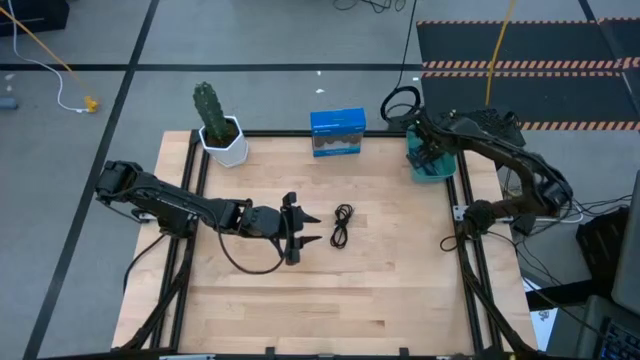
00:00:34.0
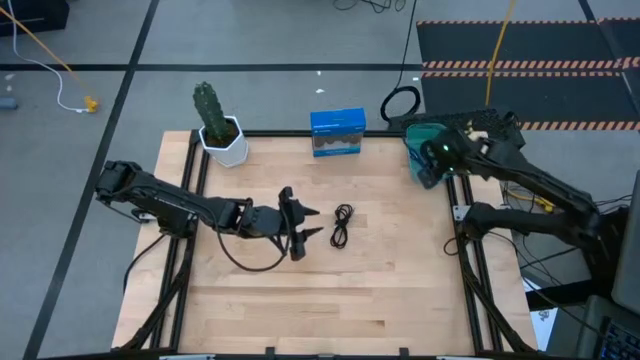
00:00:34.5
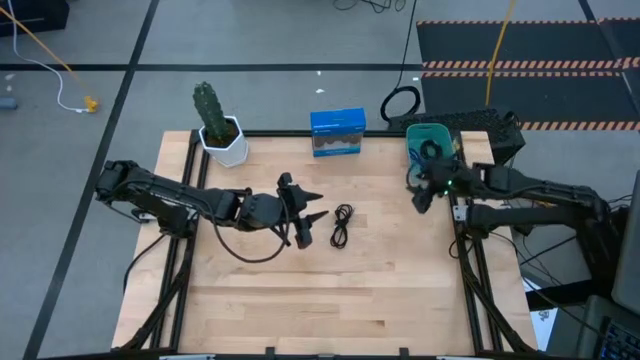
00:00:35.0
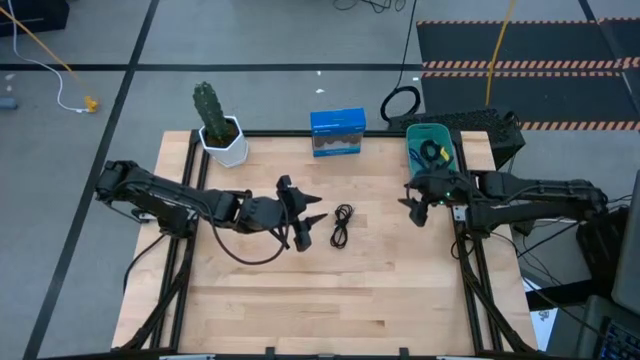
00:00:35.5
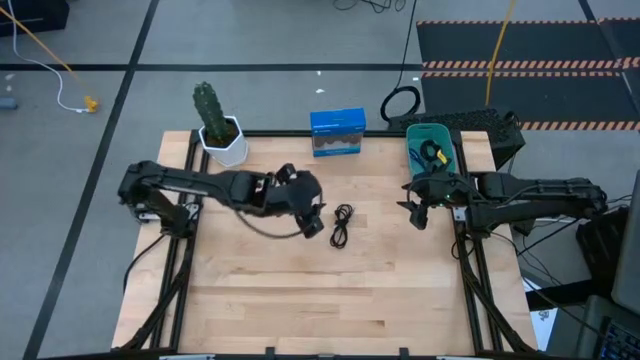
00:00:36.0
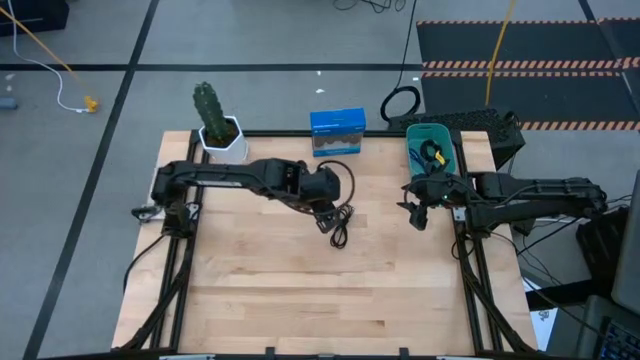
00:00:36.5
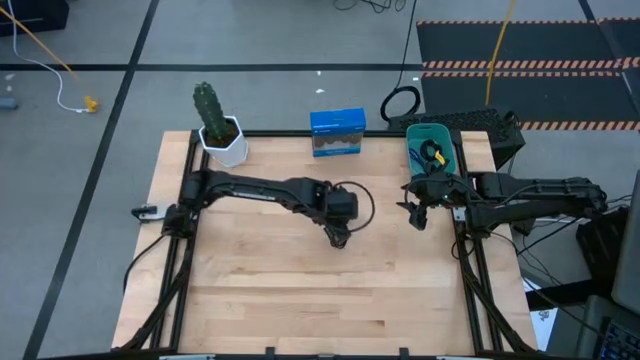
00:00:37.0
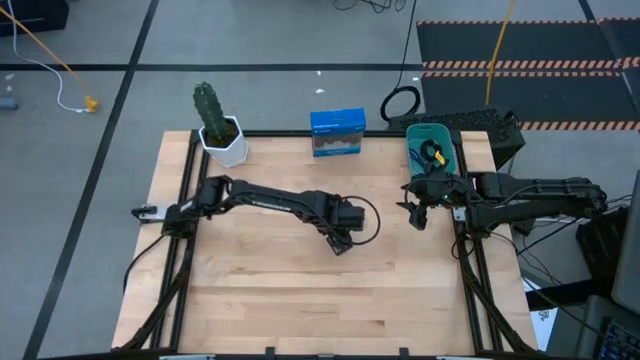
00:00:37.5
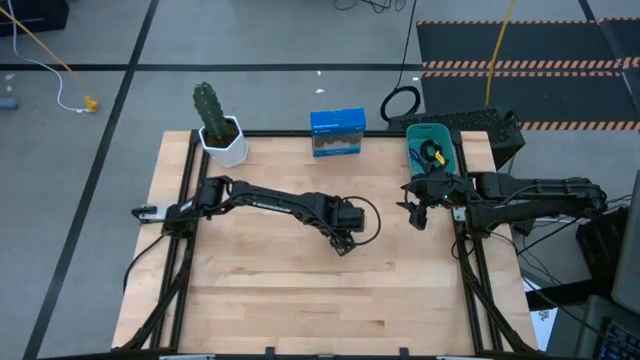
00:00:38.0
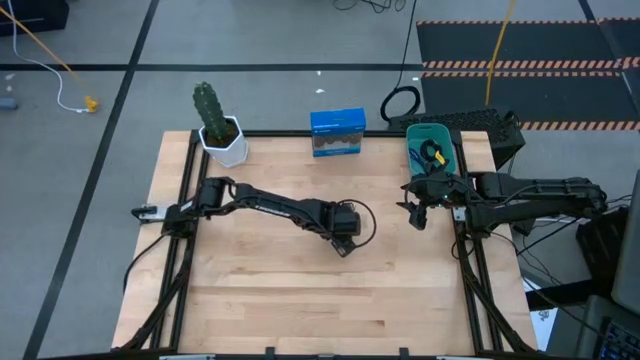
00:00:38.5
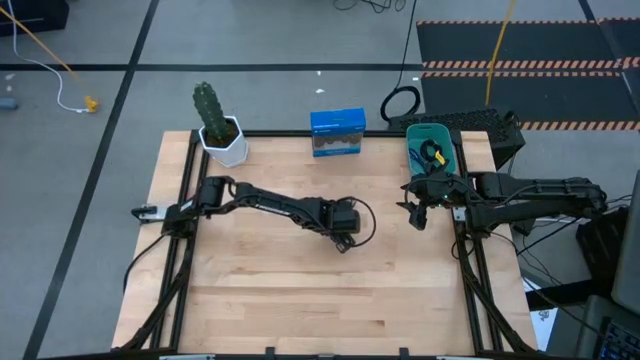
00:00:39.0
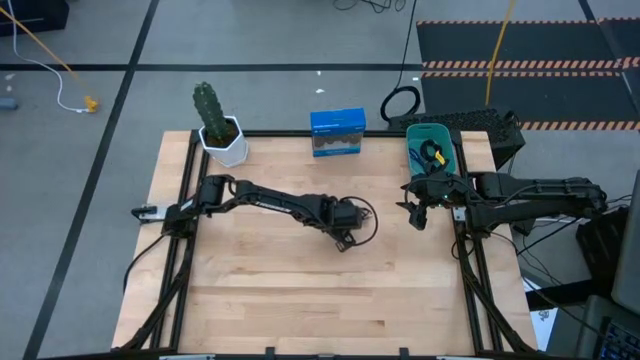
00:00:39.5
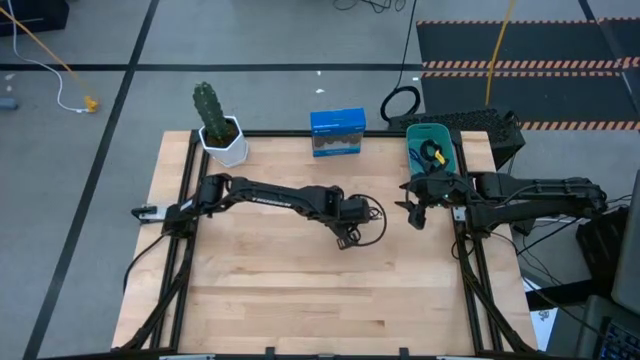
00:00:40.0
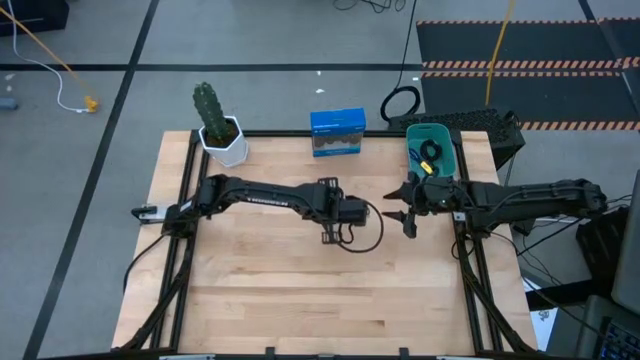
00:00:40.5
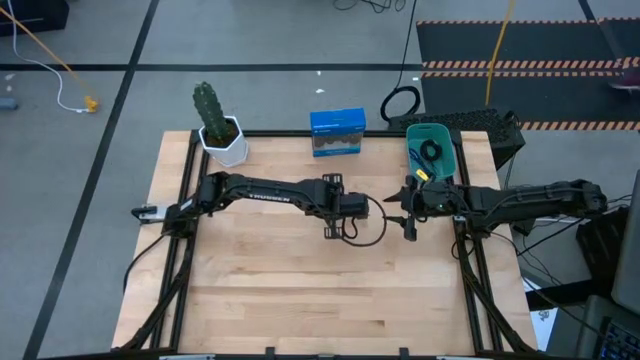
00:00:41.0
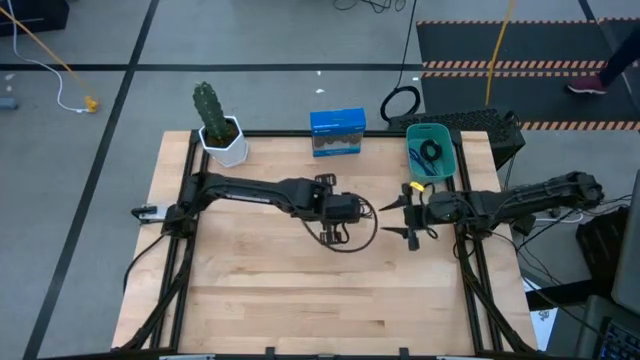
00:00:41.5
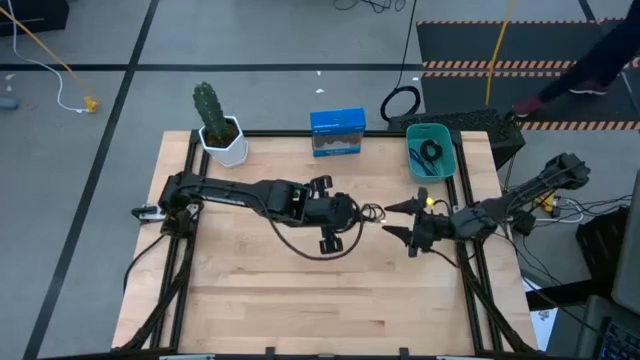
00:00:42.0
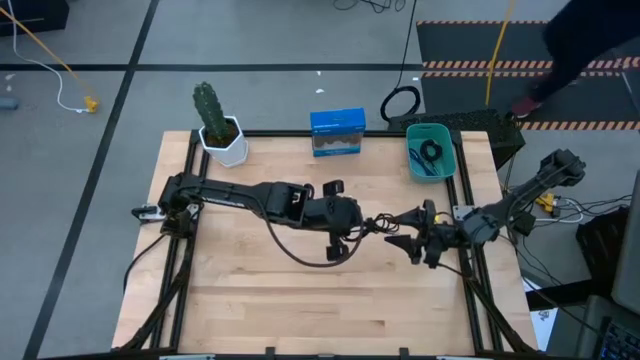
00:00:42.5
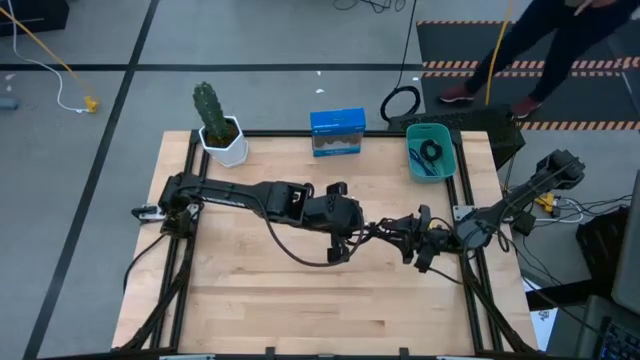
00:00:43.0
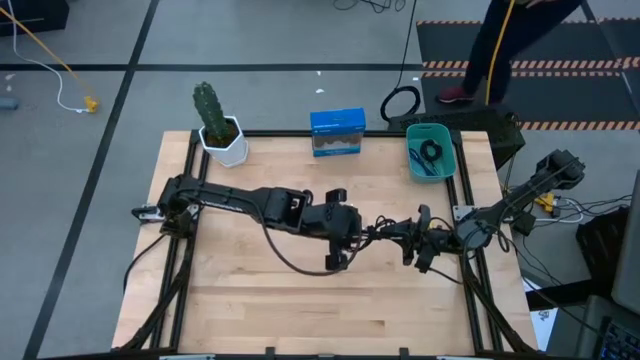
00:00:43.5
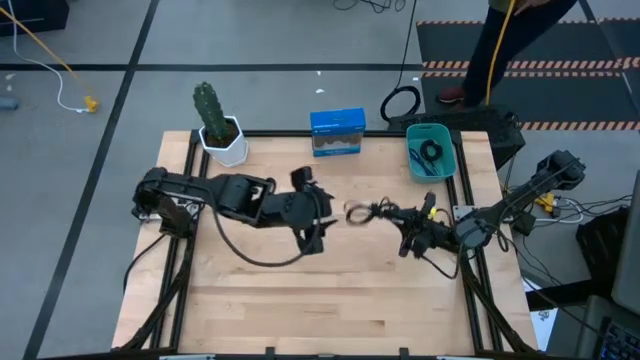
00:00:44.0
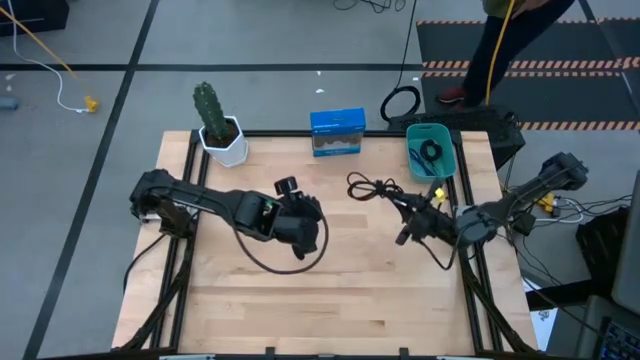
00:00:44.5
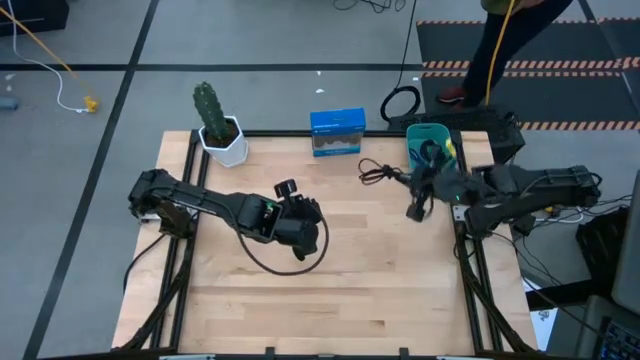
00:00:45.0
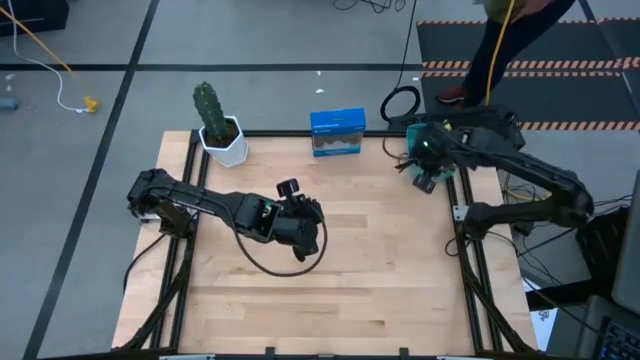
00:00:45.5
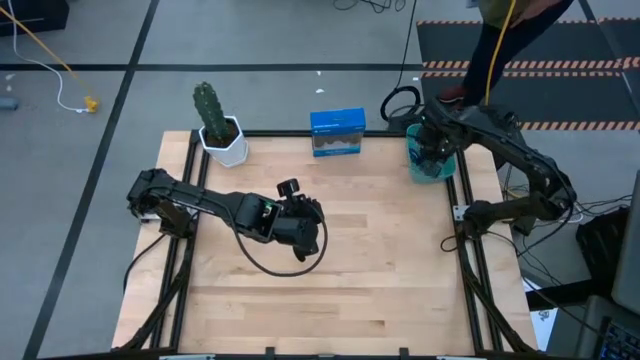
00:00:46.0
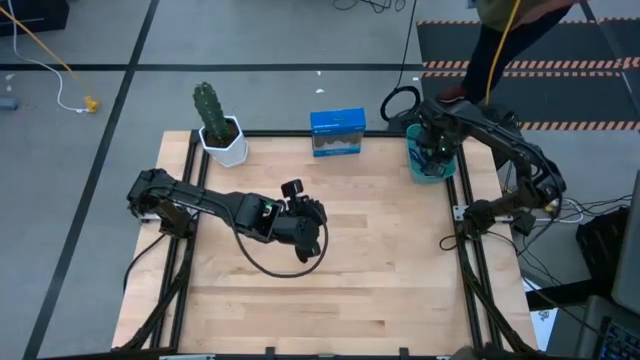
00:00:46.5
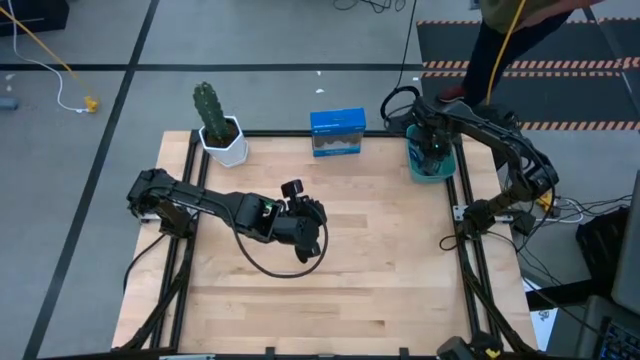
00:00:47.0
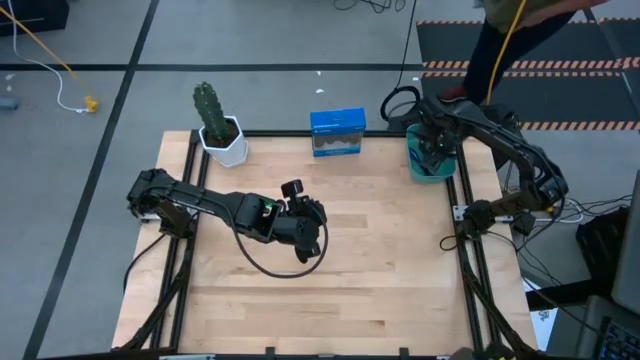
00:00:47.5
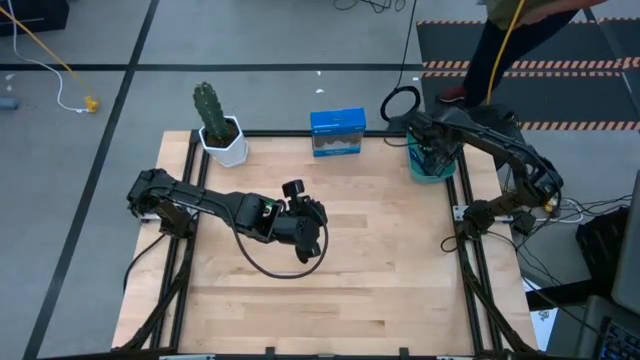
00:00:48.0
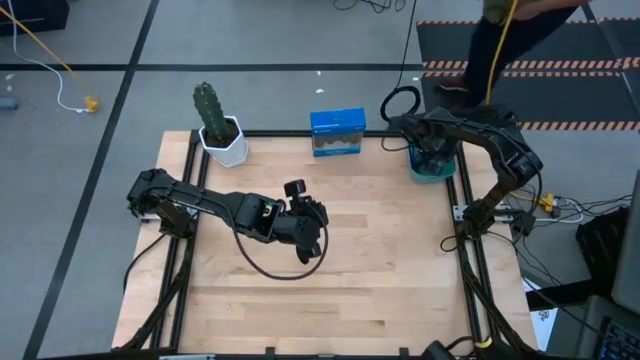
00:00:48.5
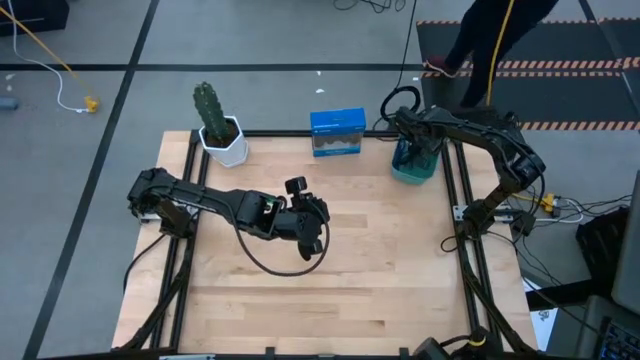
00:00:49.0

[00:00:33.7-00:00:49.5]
Task: Pick and place USB-C Cables
Put the black USB cable into the blue bin

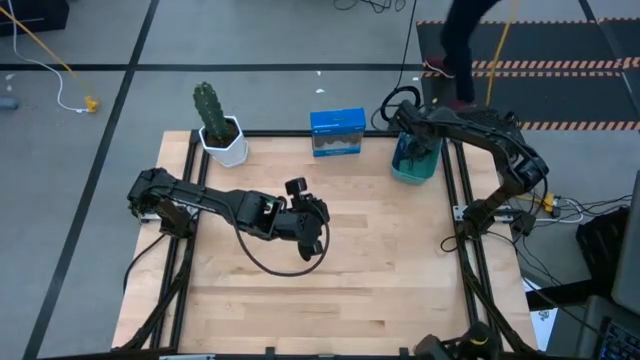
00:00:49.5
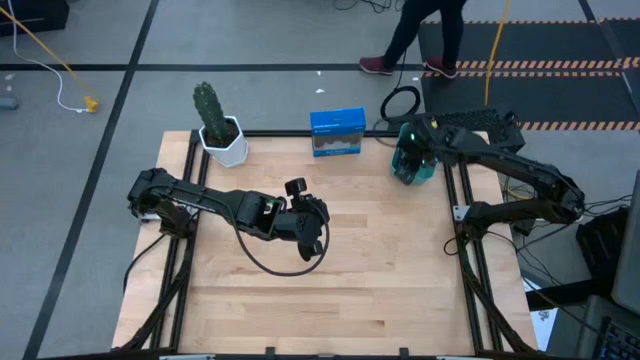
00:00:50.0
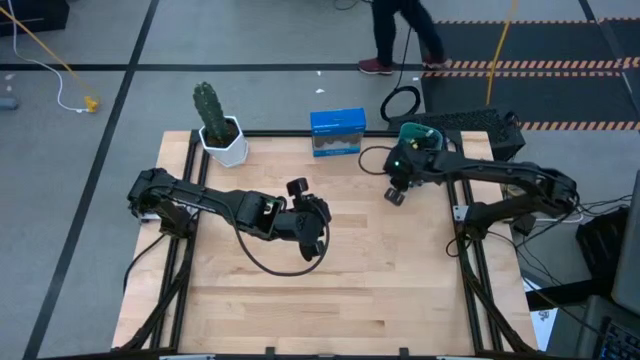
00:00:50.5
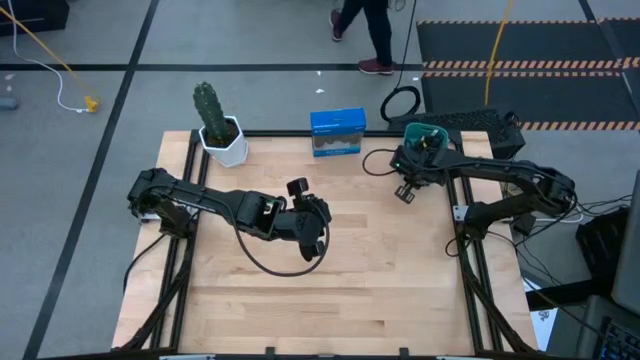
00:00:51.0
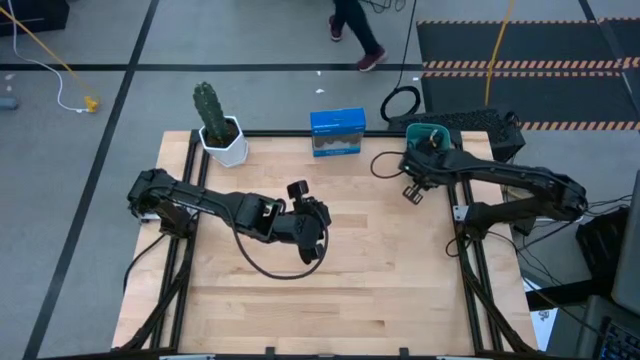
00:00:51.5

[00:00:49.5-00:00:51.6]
Adjust the blue bin

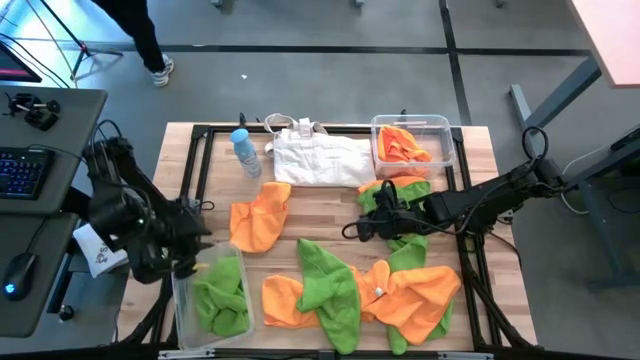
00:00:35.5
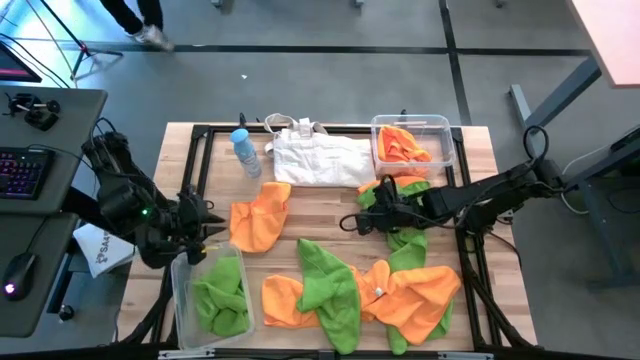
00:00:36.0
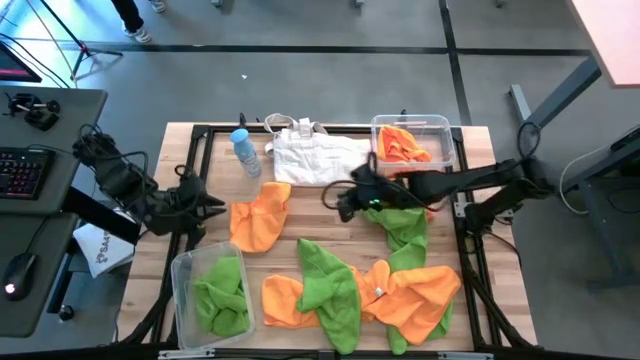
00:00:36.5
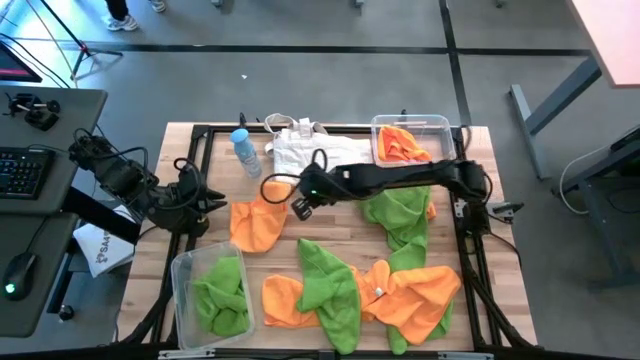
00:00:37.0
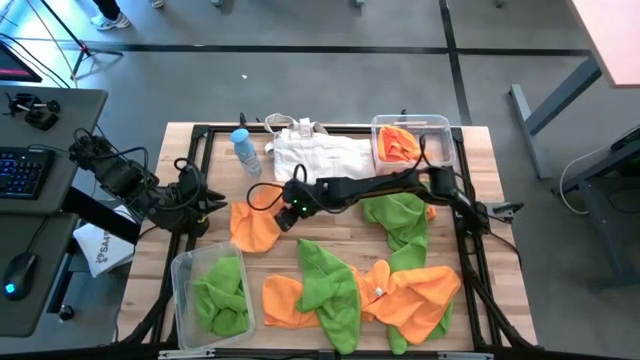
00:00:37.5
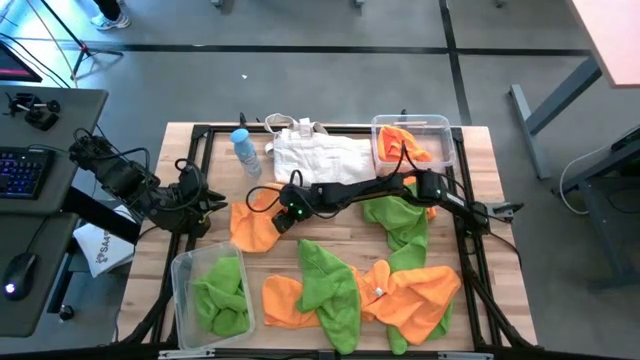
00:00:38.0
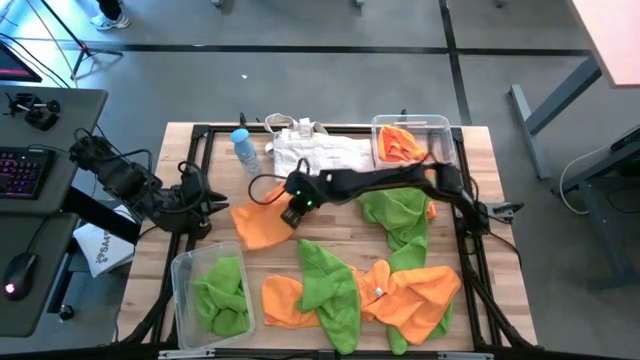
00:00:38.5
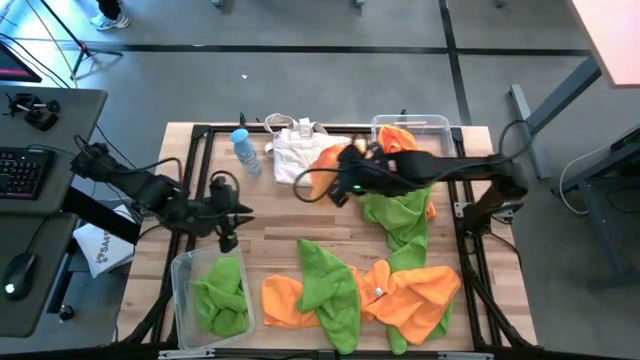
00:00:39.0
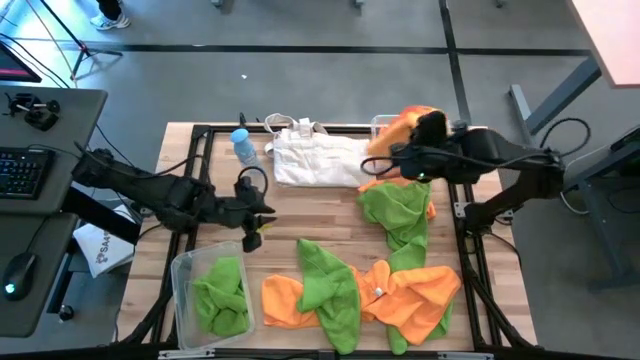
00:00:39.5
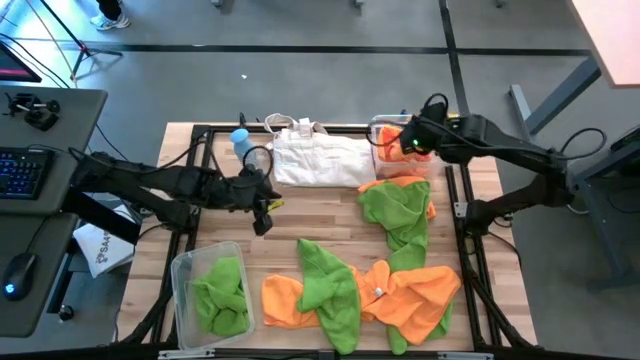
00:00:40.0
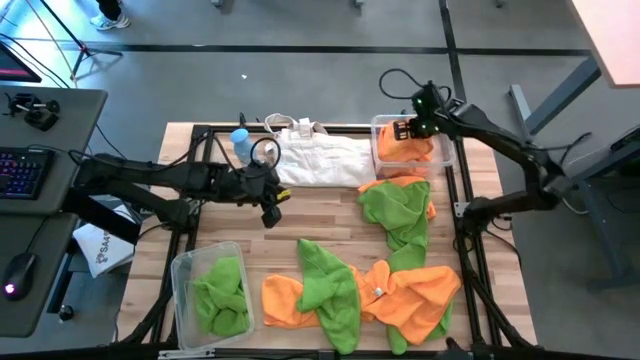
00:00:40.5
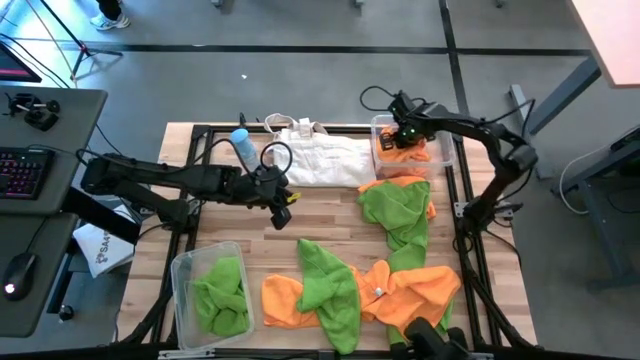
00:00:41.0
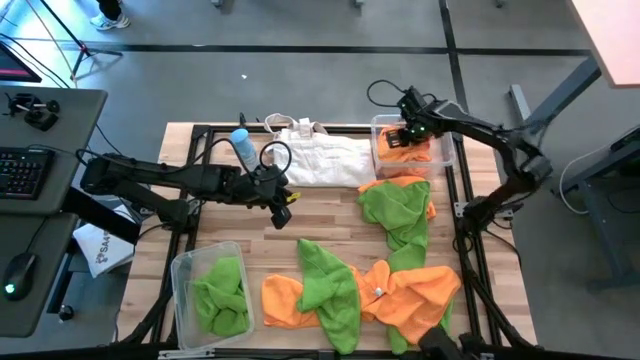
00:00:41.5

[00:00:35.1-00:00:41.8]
Task: Sort microfiber towel by color & place in baskets
Put the orange microfiber cloth into the top transparent bin
